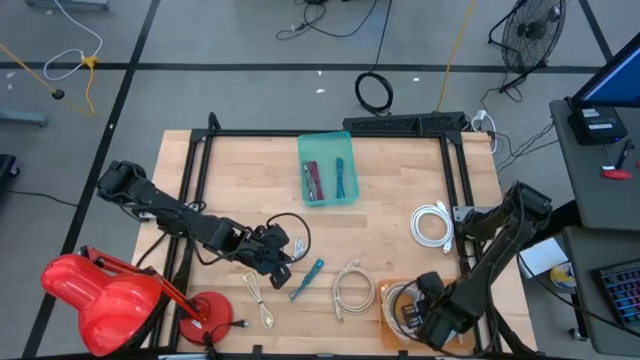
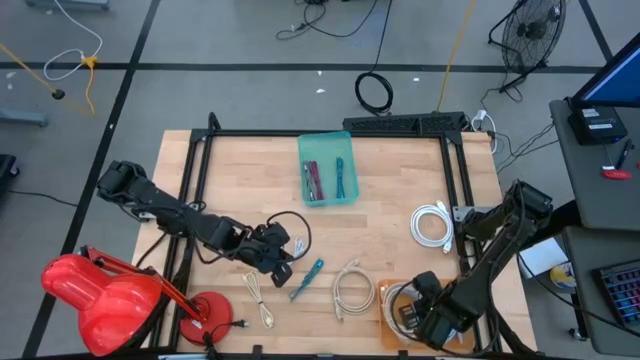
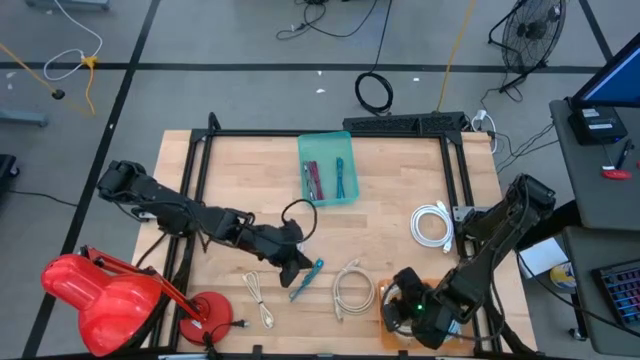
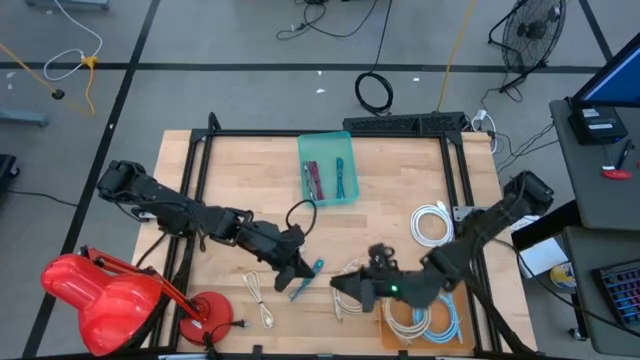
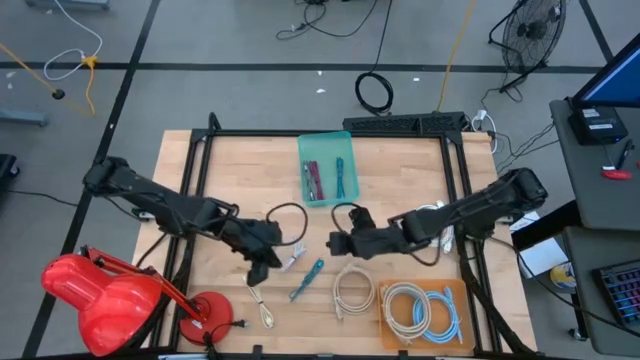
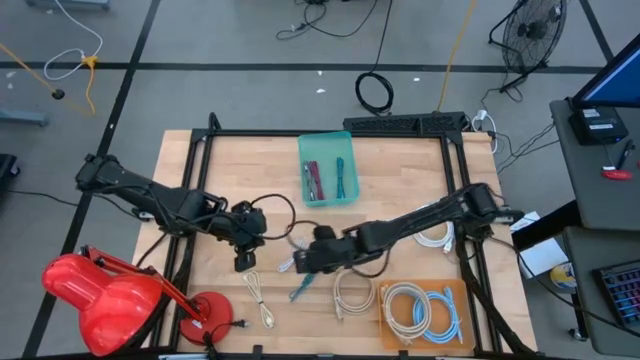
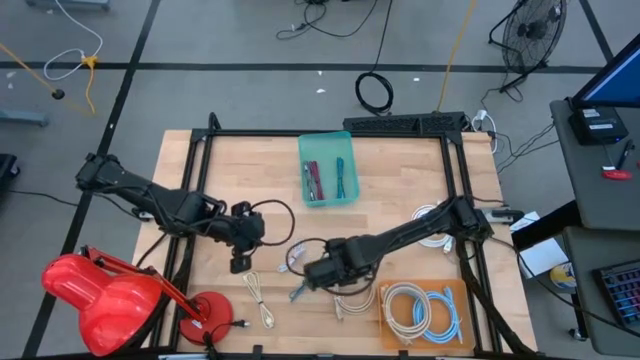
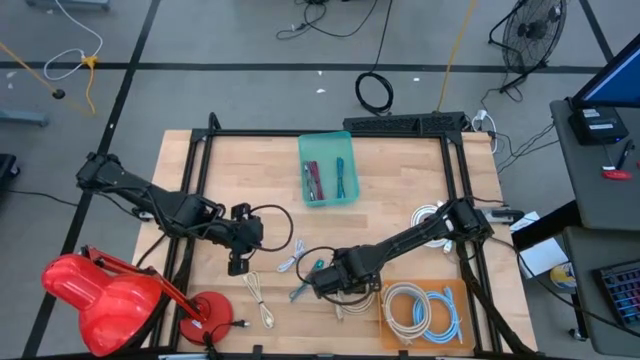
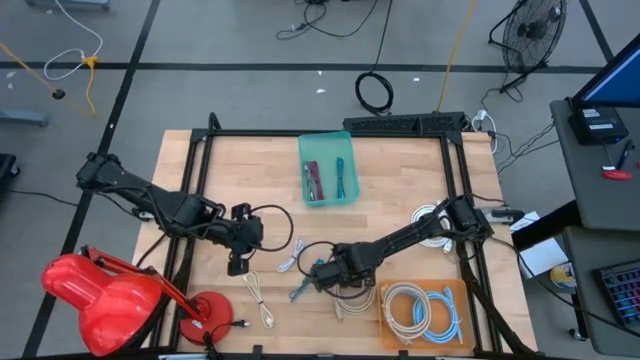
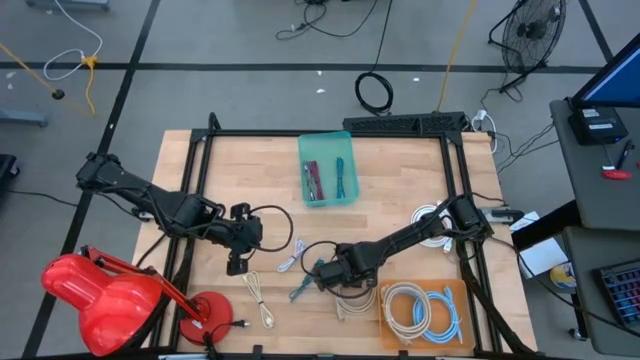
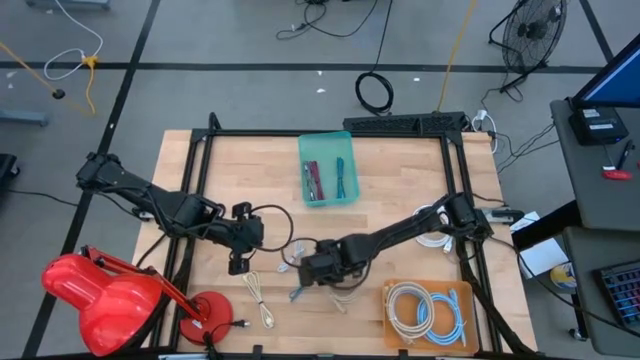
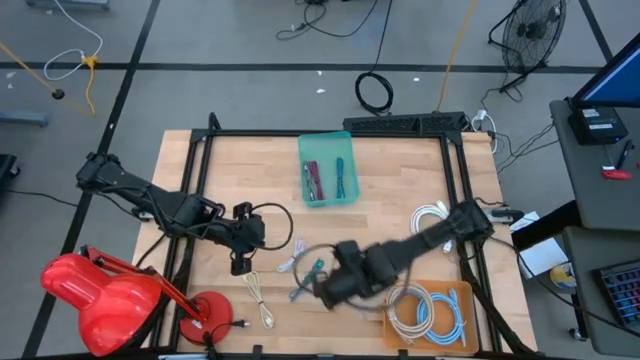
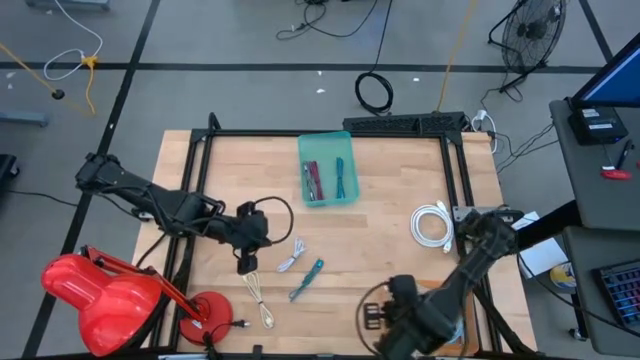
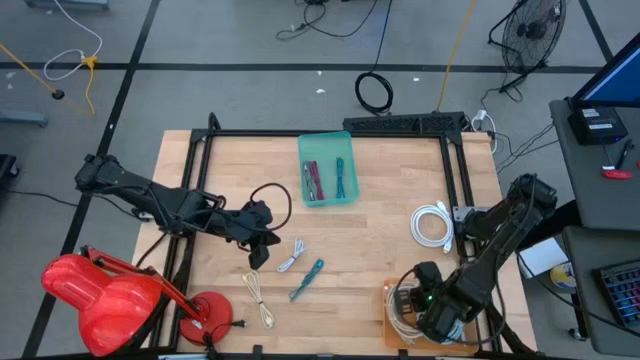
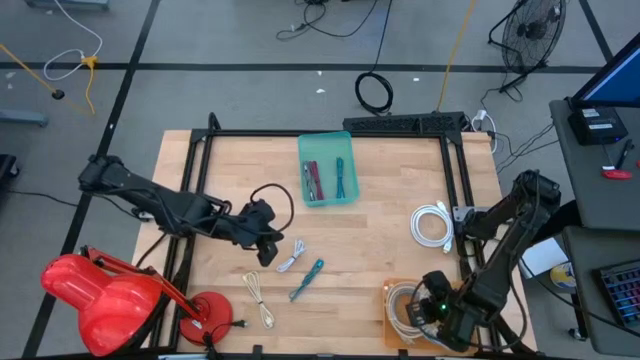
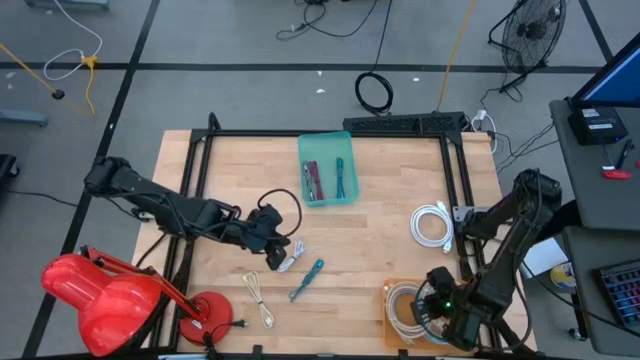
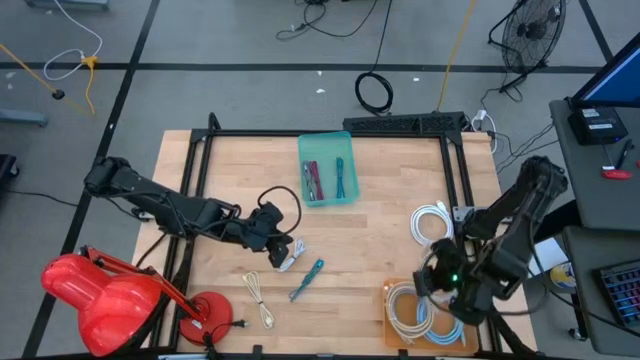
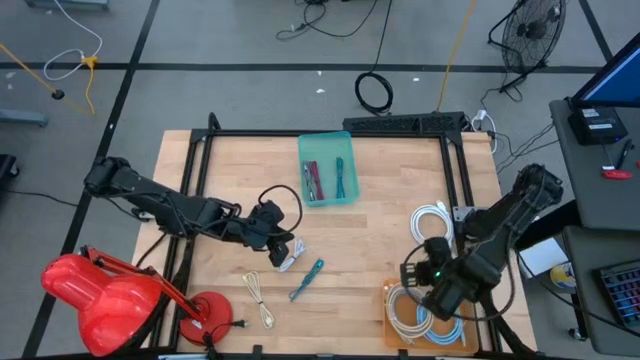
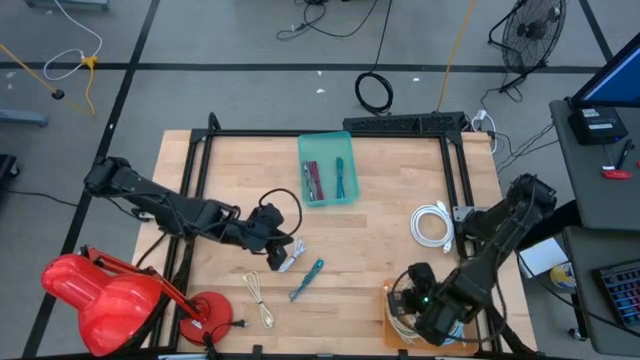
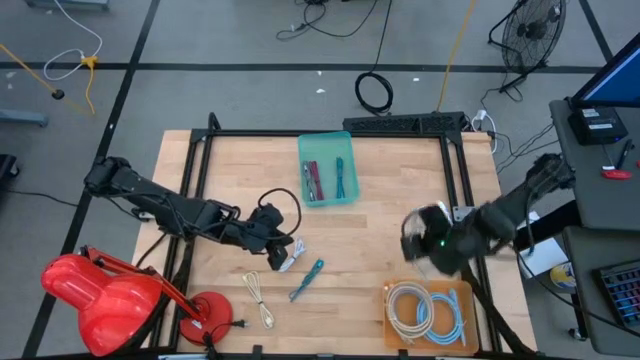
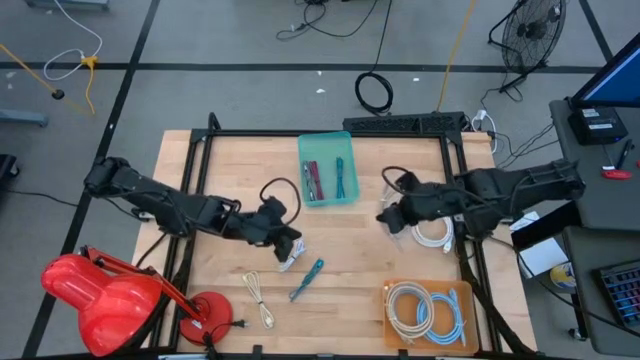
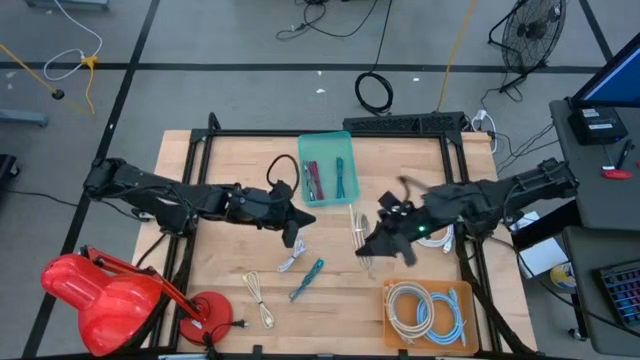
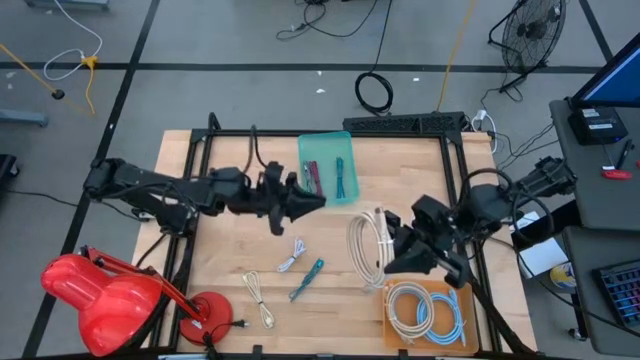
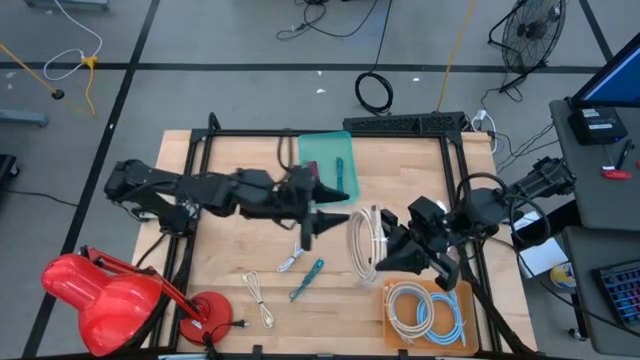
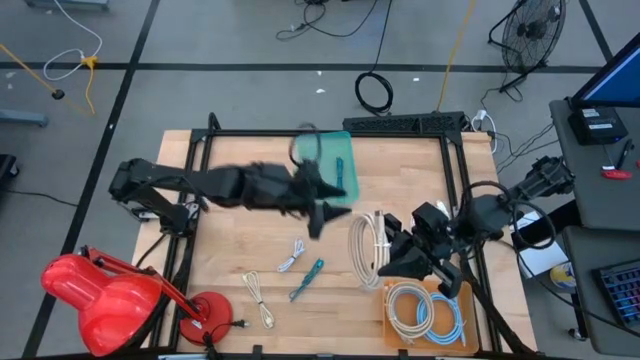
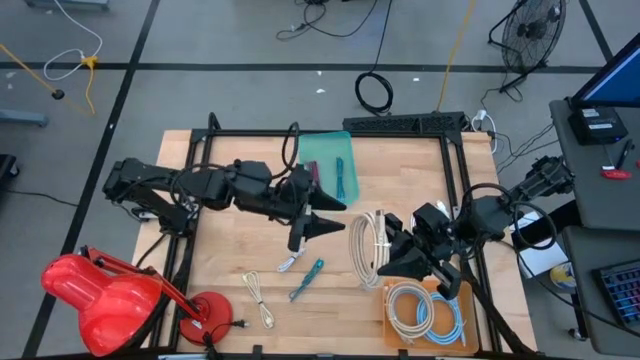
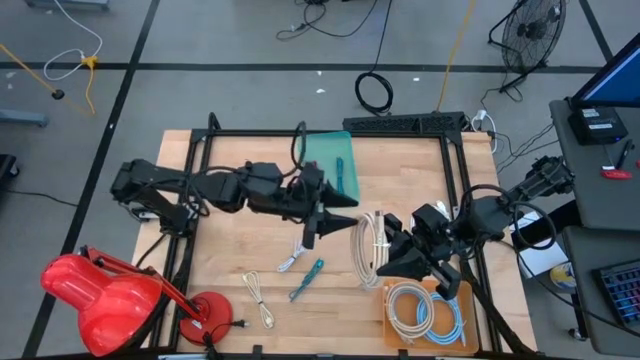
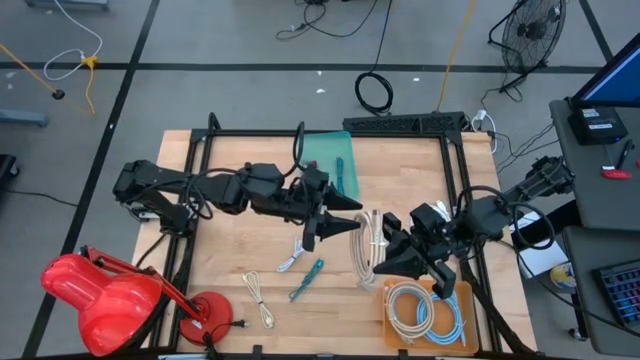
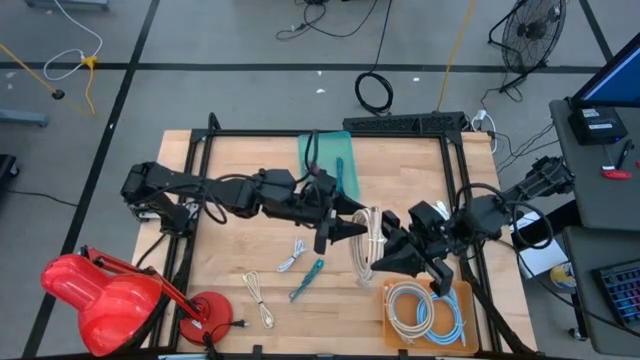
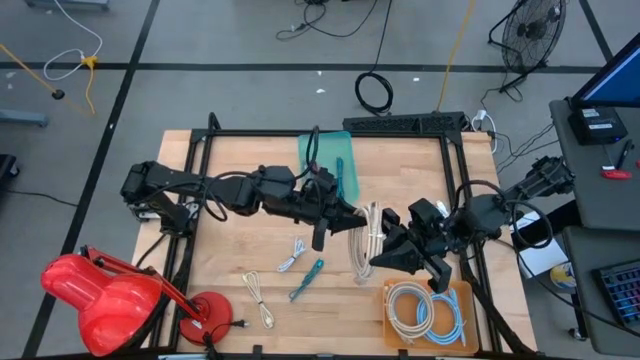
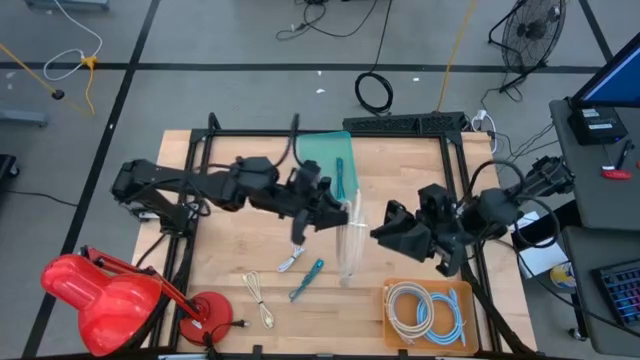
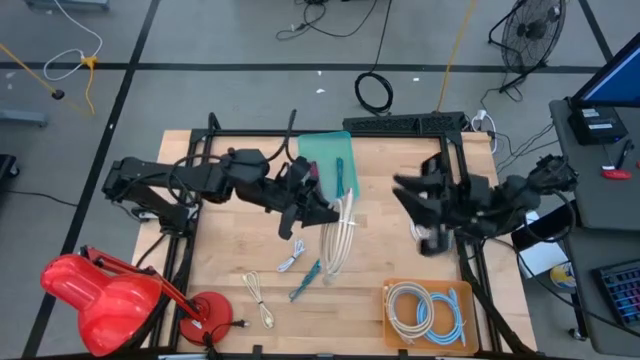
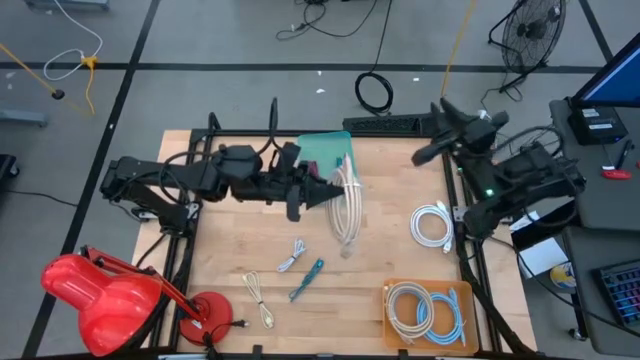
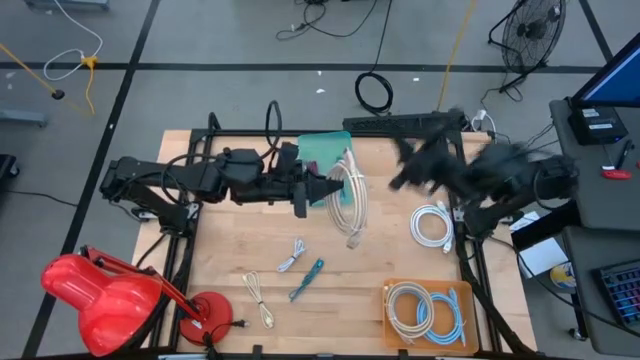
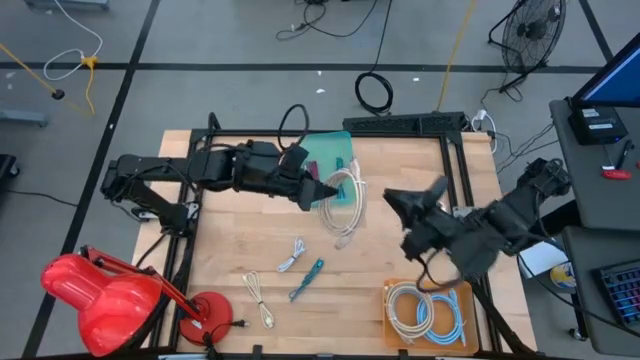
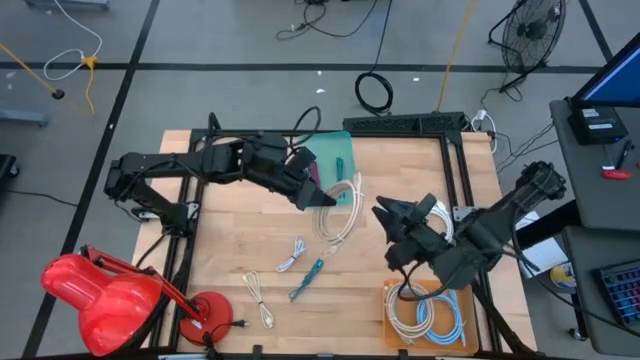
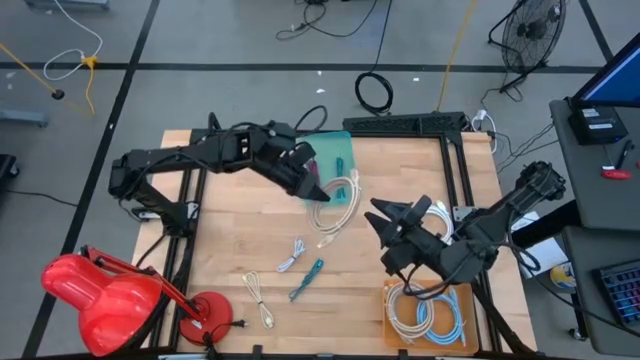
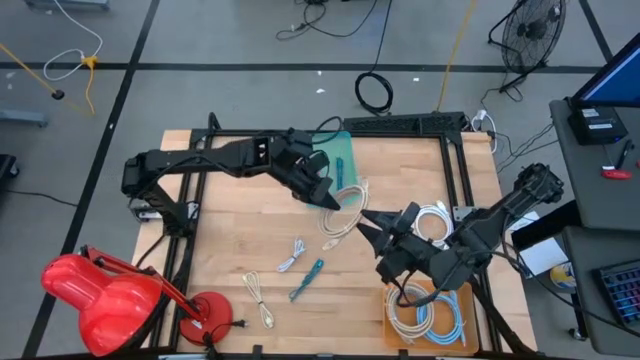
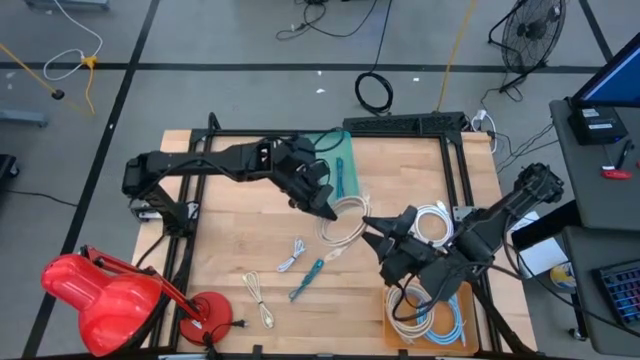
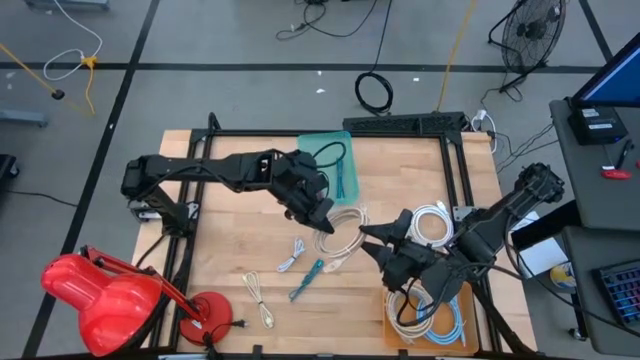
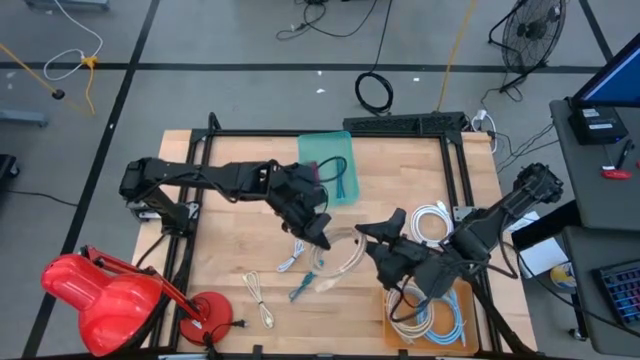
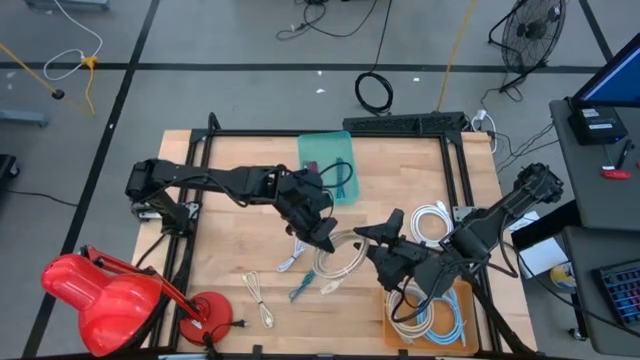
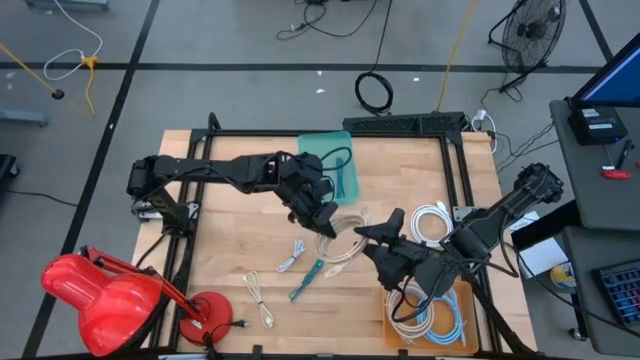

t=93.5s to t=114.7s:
Task: Pick & Place USB Port
Put the right brown charger cable into the orange bin
